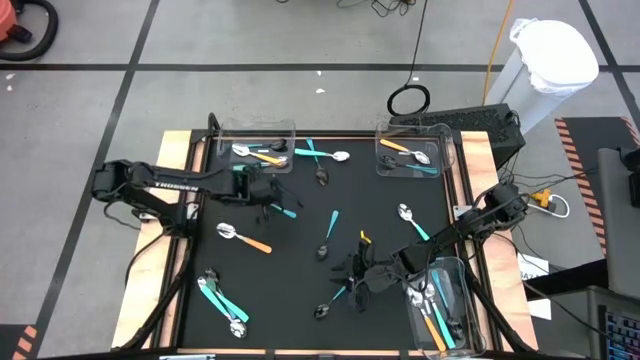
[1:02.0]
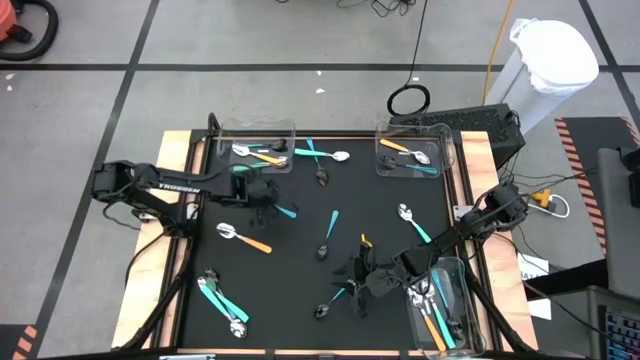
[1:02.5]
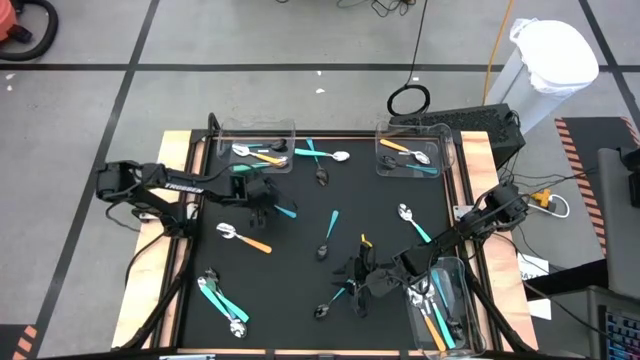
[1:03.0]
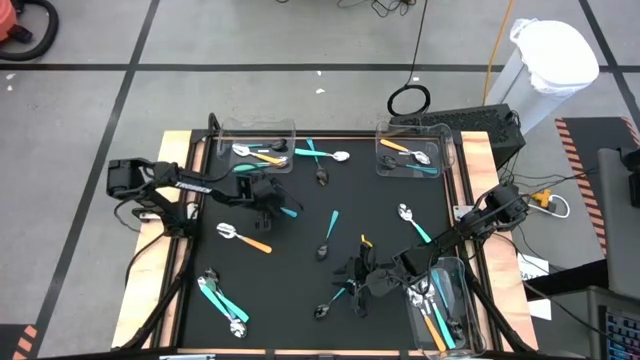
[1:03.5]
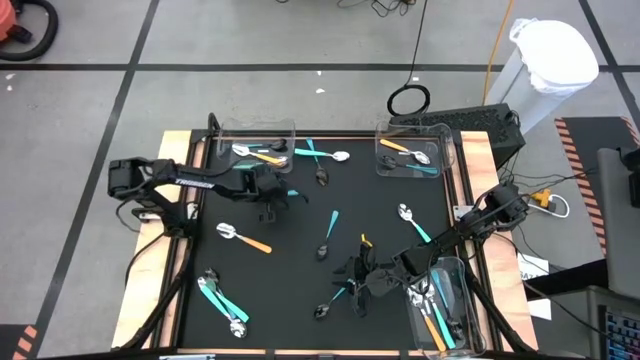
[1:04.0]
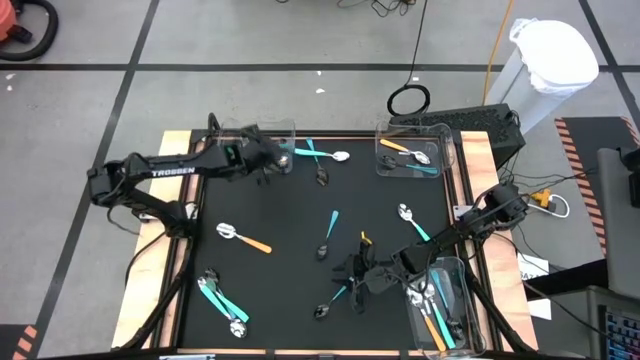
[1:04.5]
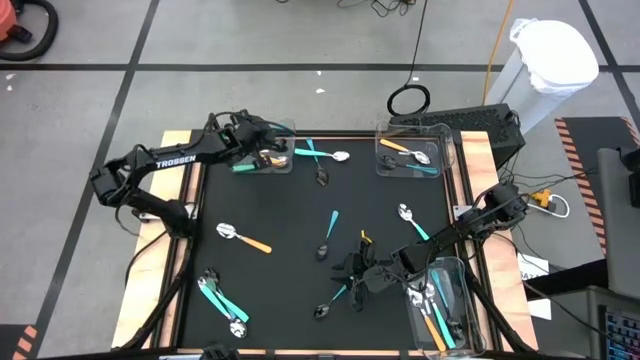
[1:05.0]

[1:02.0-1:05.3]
Task: Sort silverware by color (type)
Put the blue spoon into the top left transparent bin

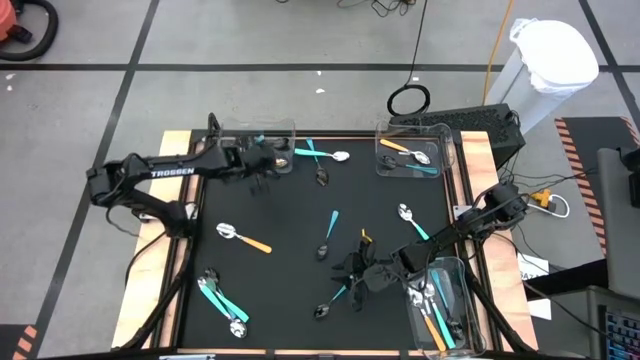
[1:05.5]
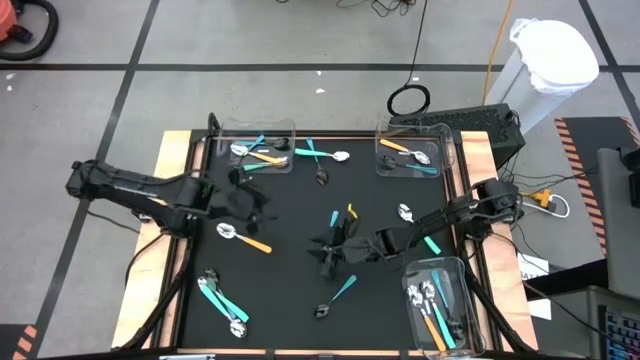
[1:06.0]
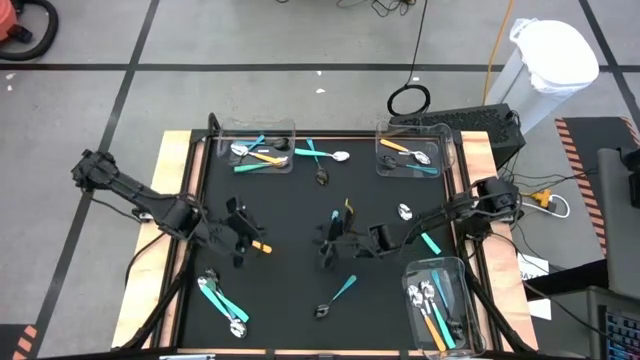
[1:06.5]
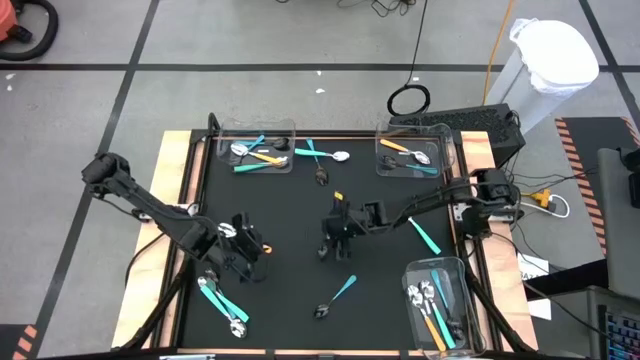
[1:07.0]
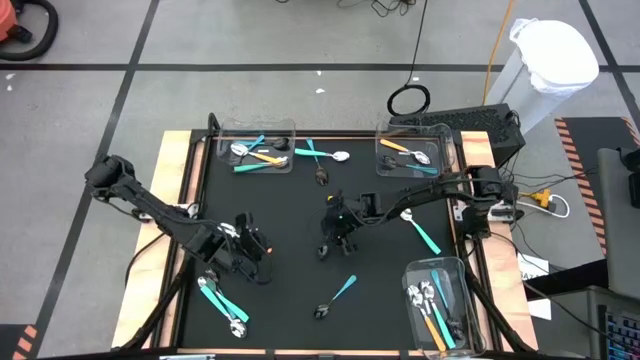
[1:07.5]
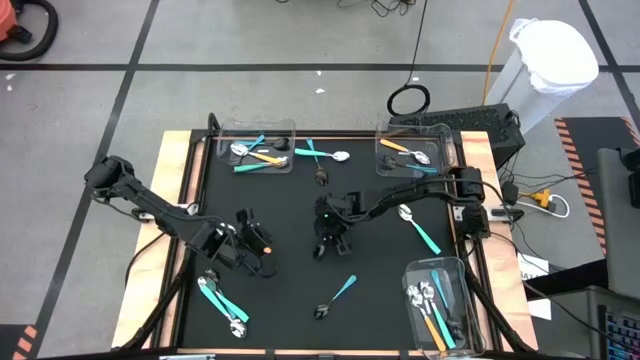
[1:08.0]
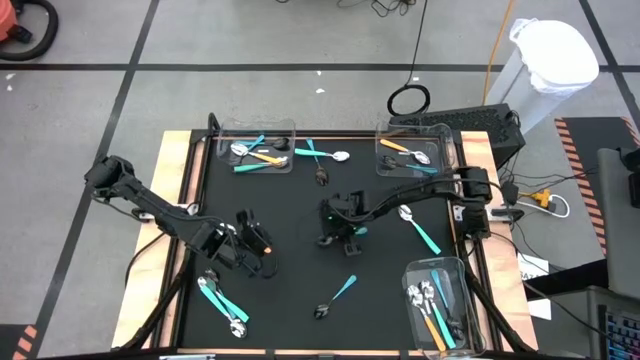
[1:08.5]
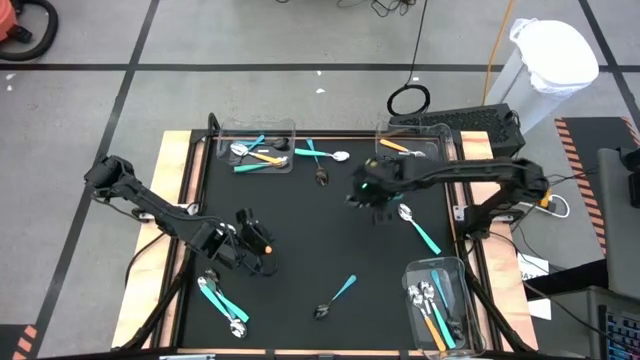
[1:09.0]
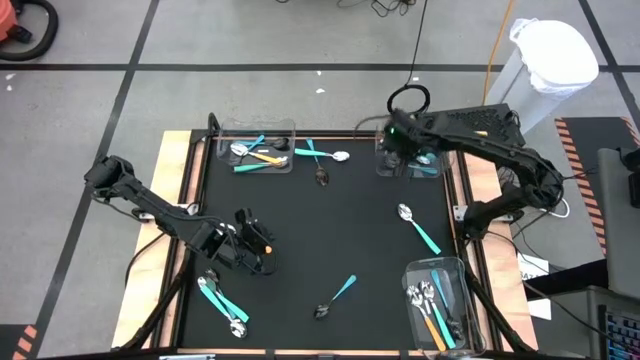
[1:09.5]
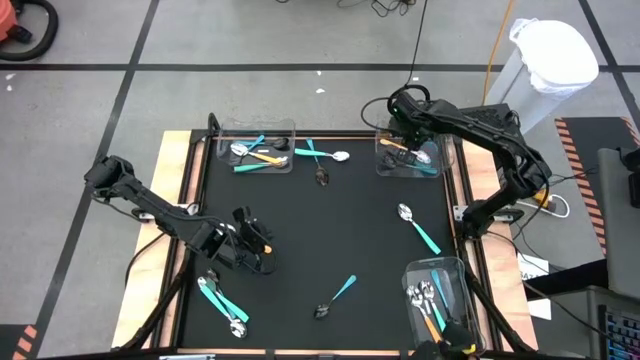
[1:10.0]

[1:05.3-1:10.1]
Put the blue spoon into the top left transparent bin

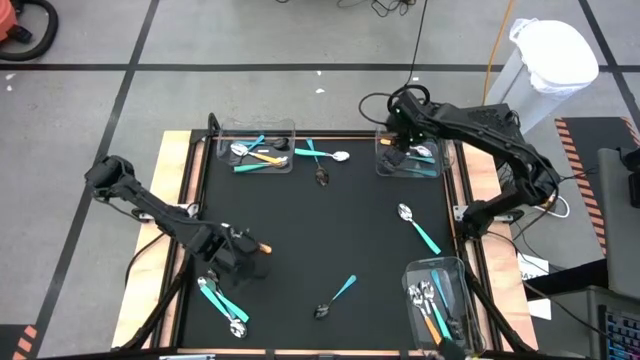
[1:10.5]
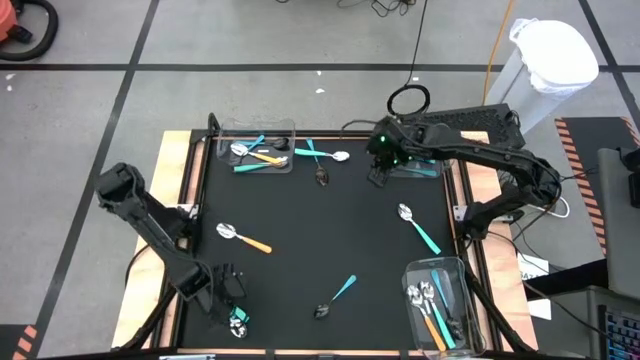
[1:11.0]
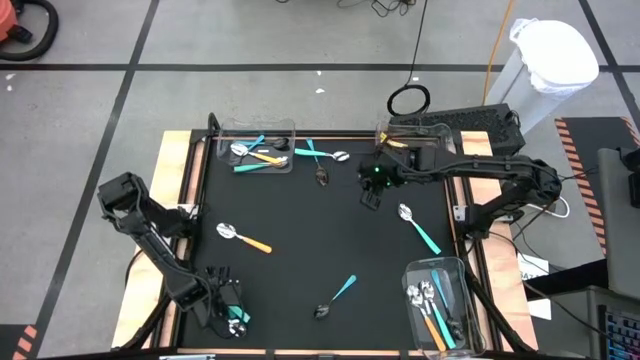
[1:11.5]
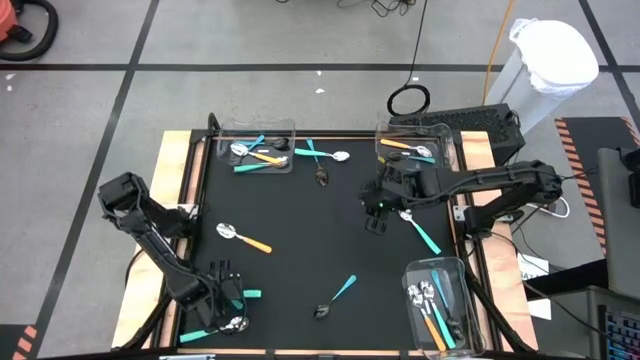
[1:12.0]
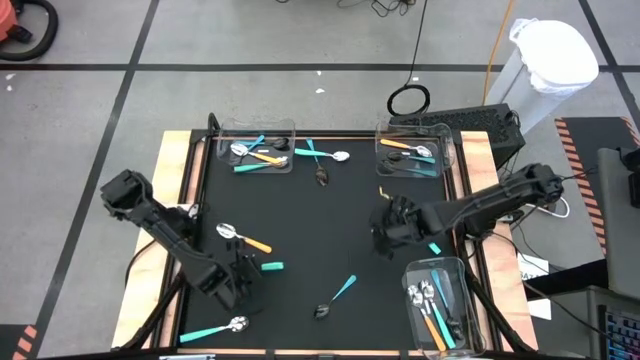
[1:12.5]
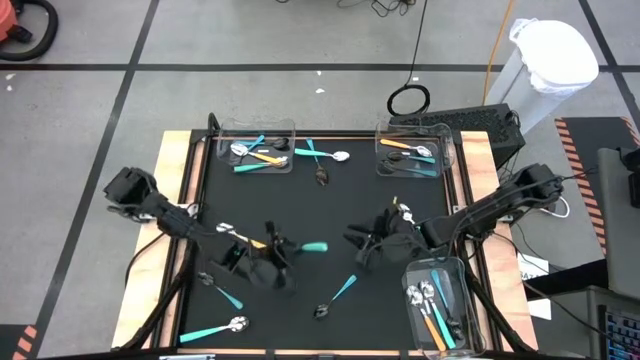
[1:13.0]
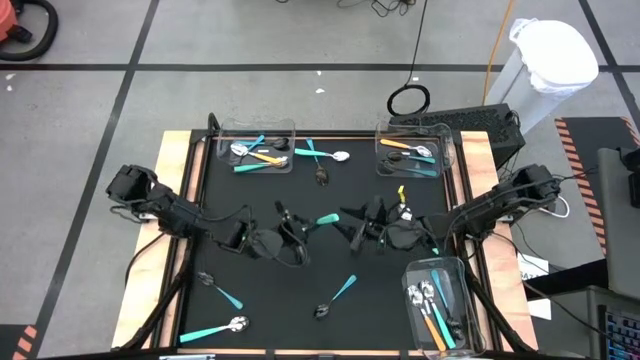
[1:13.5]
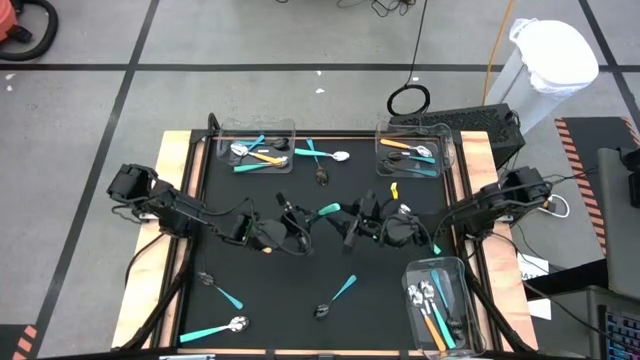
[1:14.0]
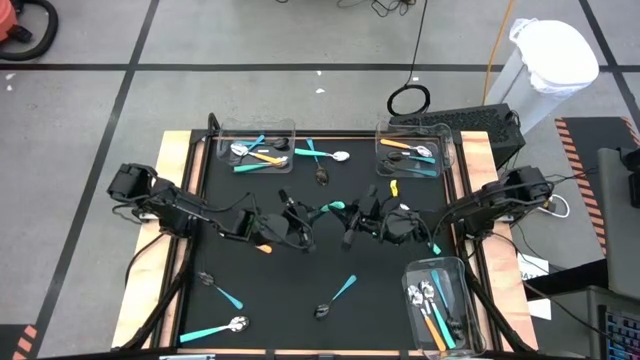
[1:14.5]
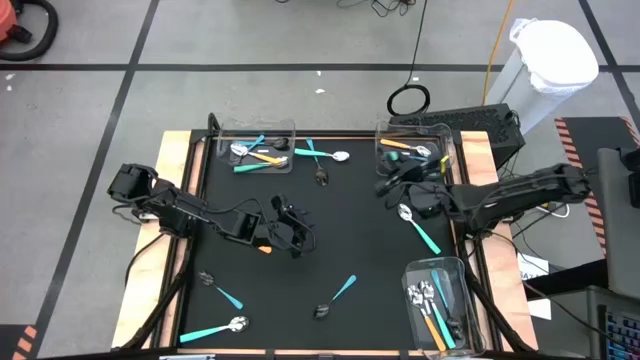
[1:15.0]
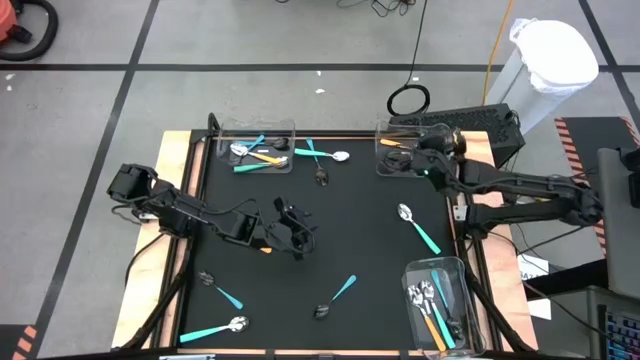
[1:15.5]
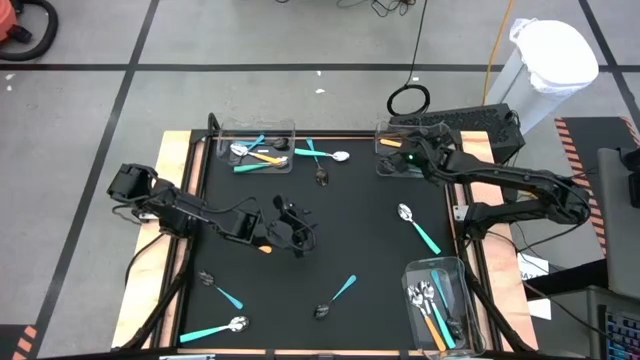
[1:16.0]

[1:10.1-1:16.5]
Put the light blue spoon into the top right transparent bin

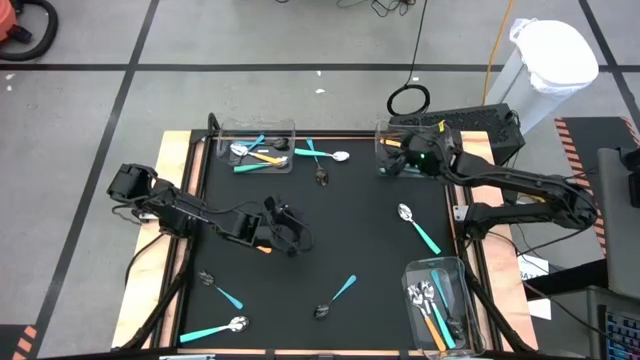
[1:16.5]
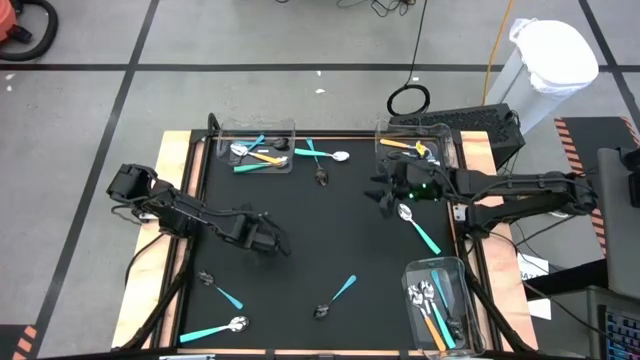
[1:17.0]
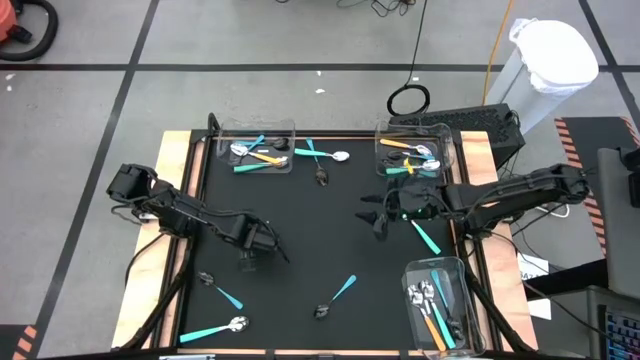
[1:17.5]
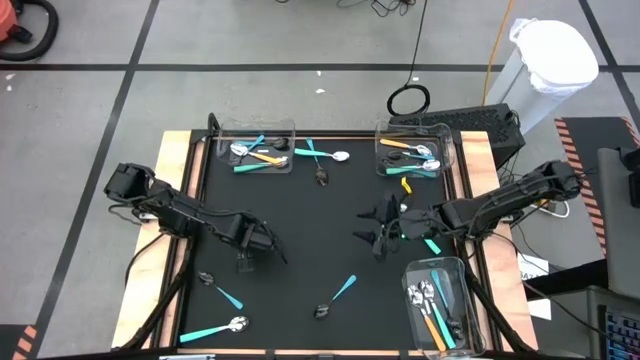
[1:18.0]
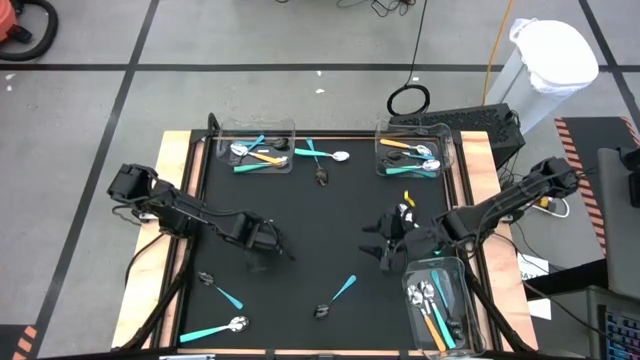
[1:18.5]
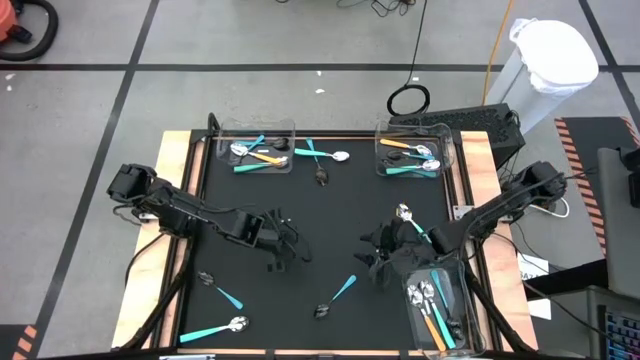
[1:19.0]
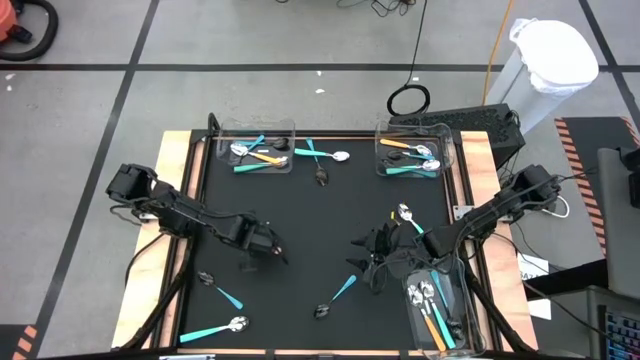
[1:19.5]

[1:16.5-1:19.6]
Put the yellow spoon into the bottom right transparent bin

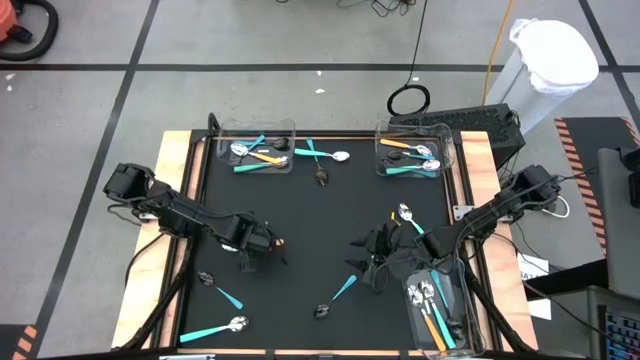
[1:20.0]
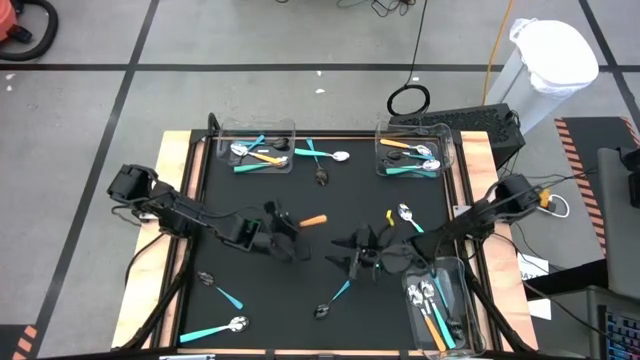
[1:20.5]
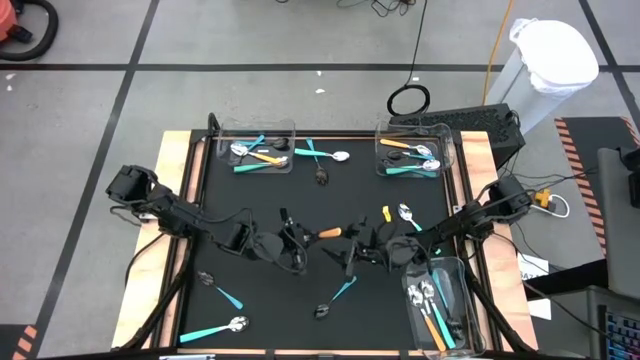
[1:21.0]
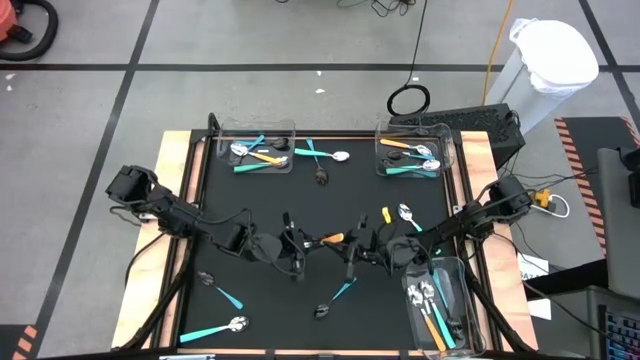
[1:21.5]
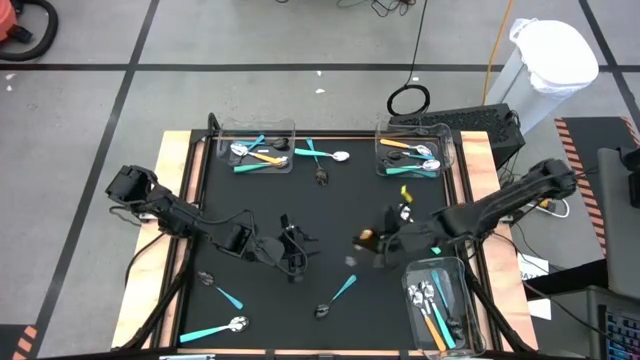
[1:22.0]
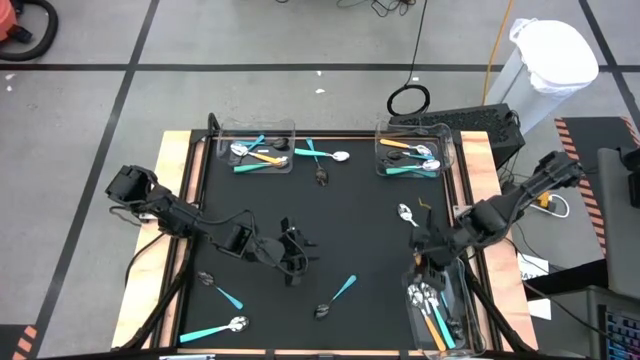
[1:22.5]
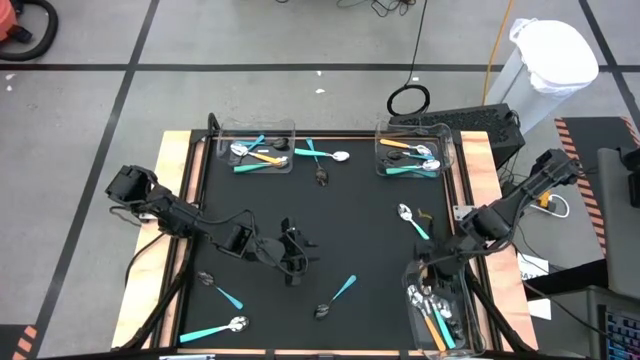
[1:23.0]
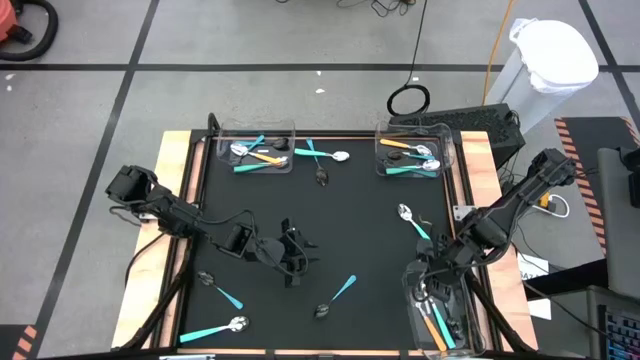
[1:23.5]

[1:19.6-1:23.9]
Put the yellow spoon into the bottom right transparent bin
